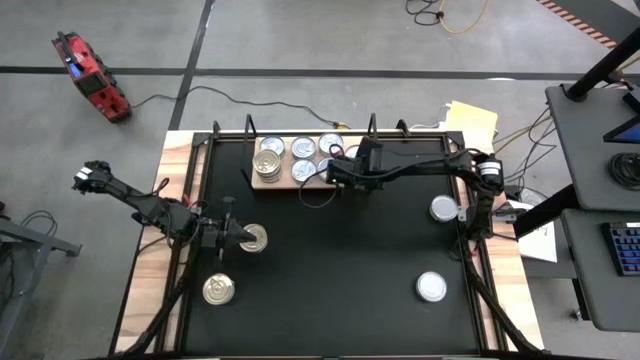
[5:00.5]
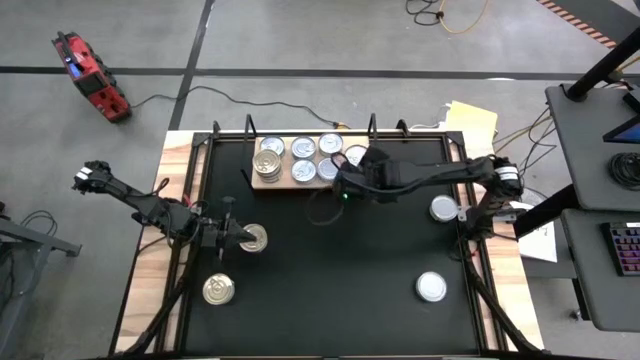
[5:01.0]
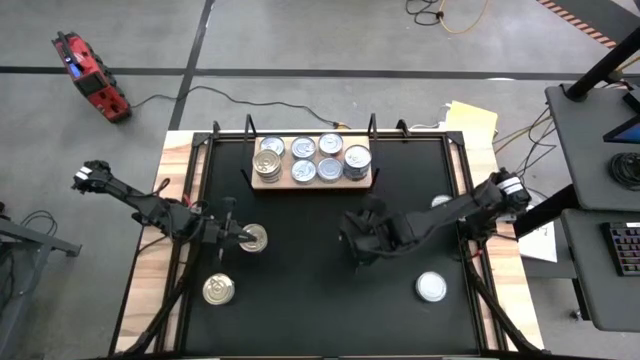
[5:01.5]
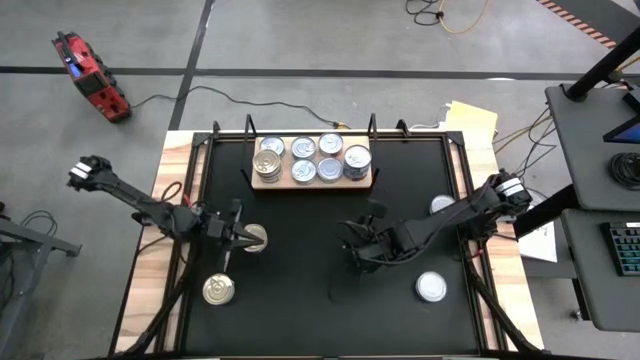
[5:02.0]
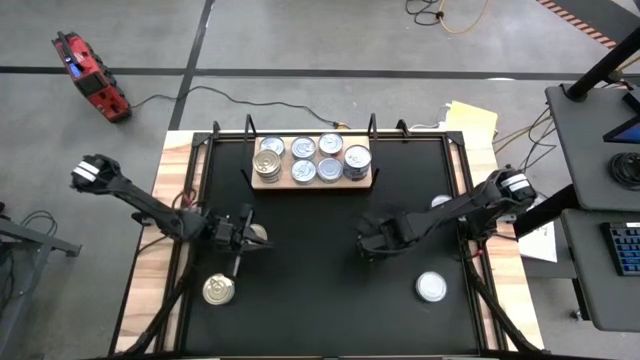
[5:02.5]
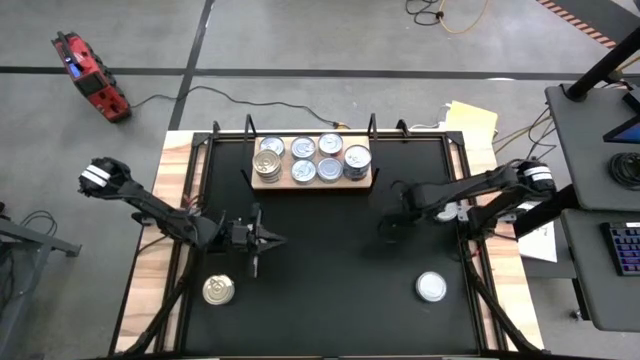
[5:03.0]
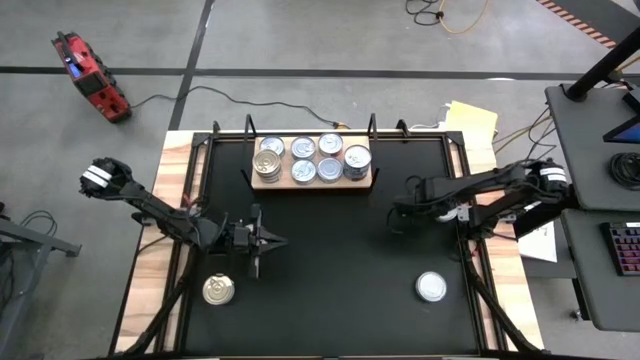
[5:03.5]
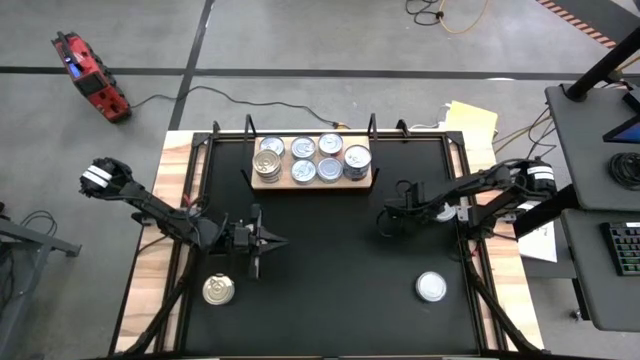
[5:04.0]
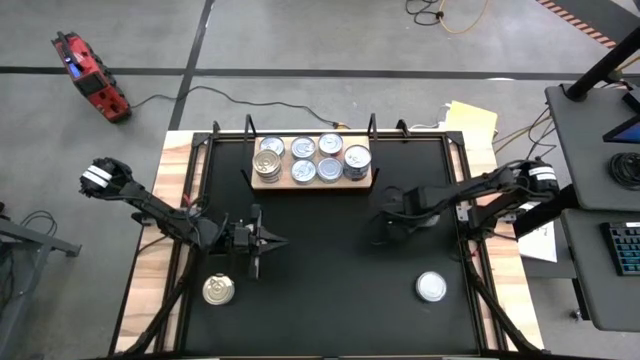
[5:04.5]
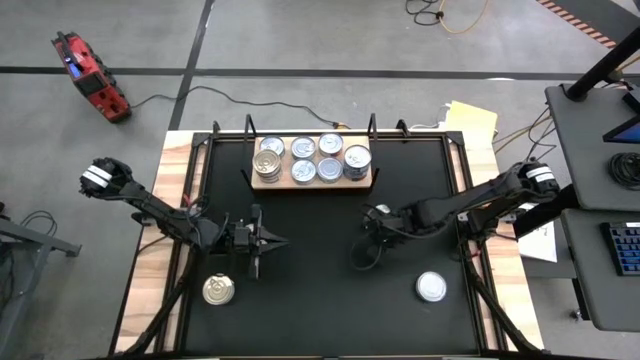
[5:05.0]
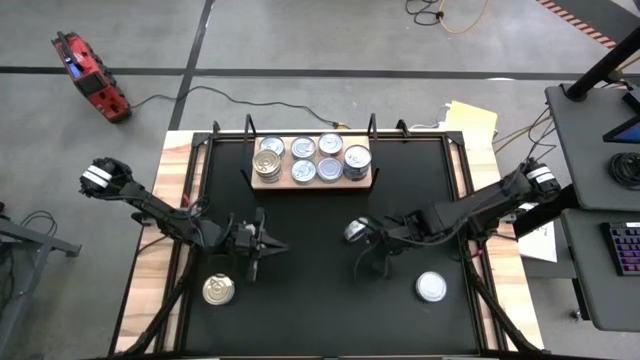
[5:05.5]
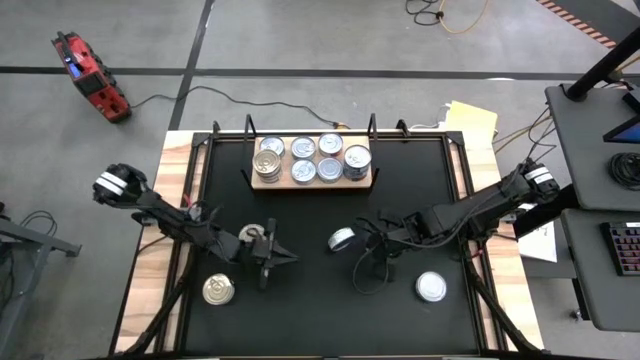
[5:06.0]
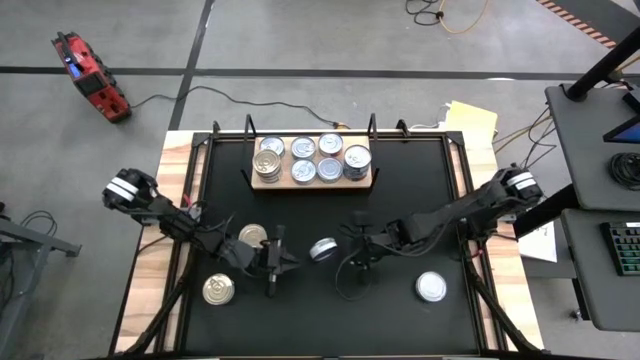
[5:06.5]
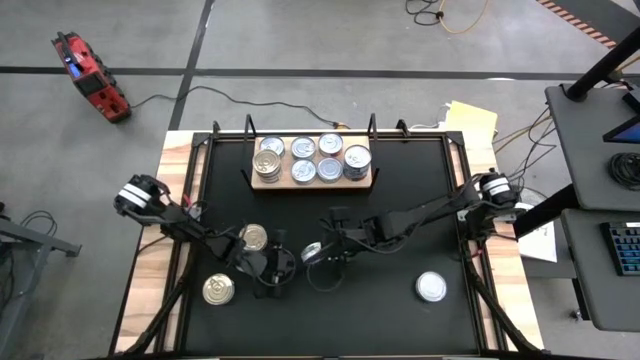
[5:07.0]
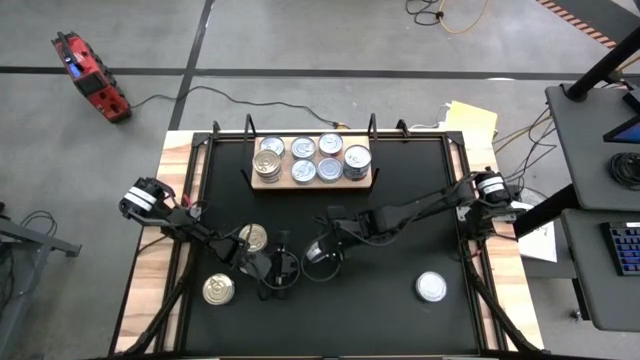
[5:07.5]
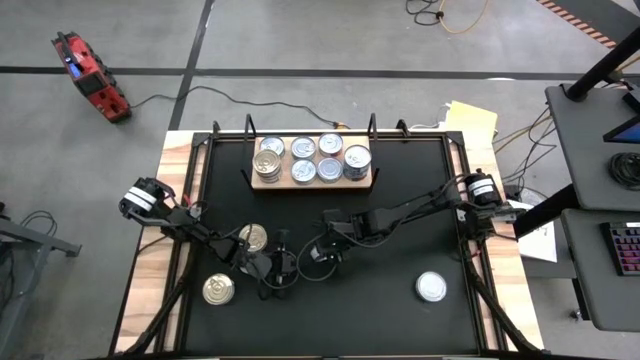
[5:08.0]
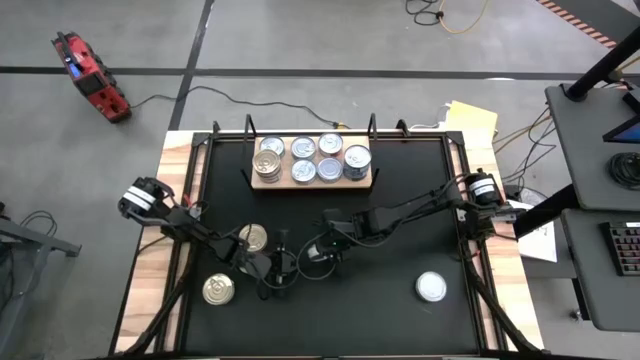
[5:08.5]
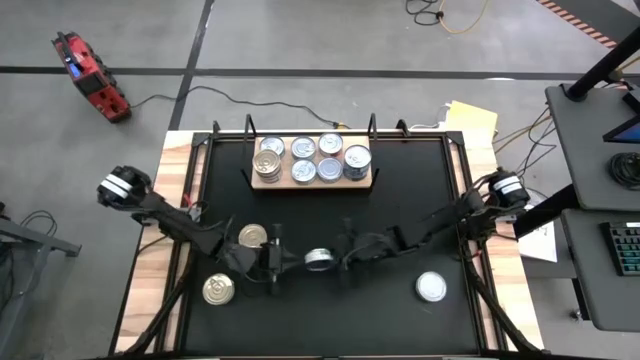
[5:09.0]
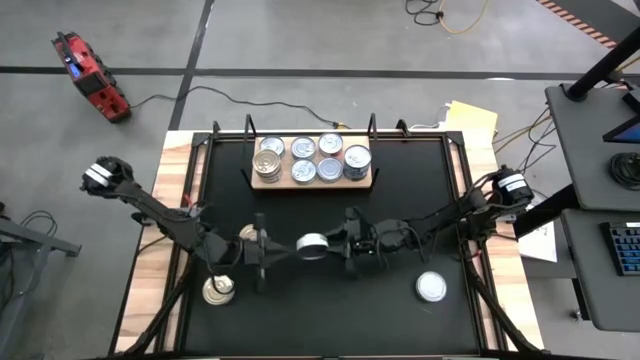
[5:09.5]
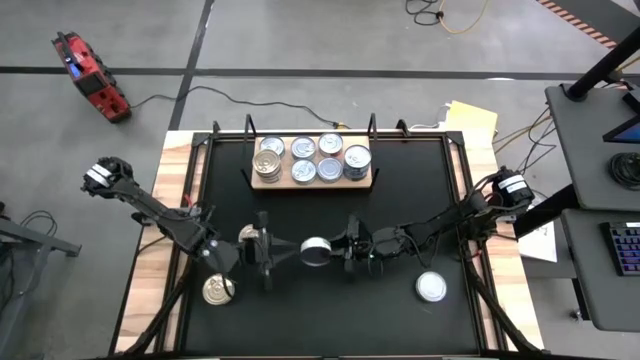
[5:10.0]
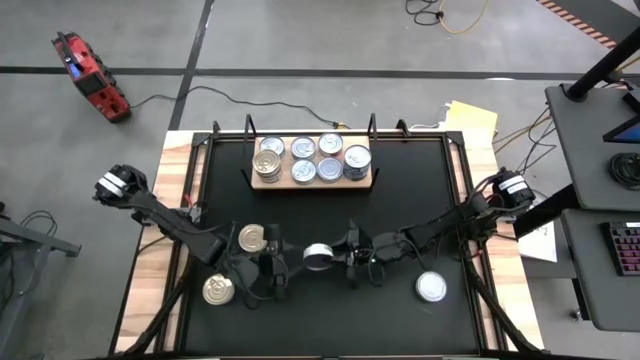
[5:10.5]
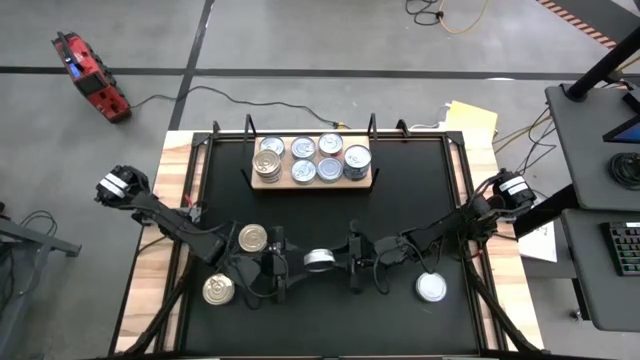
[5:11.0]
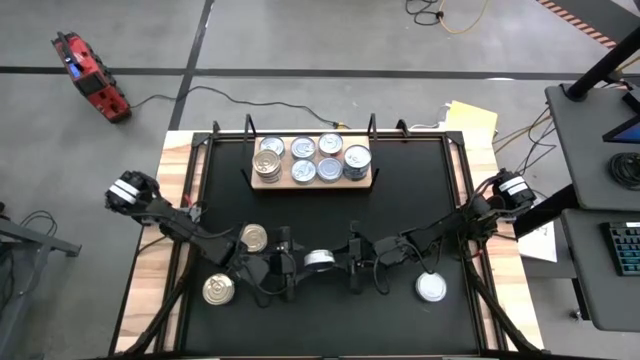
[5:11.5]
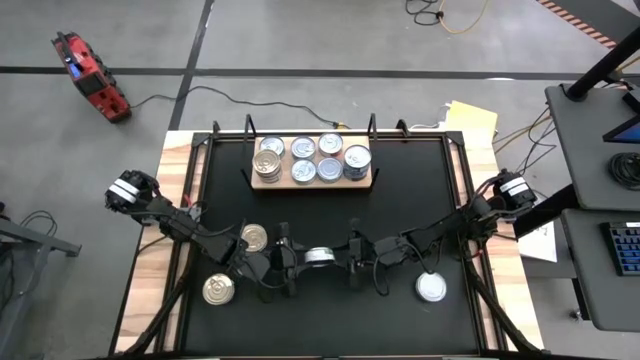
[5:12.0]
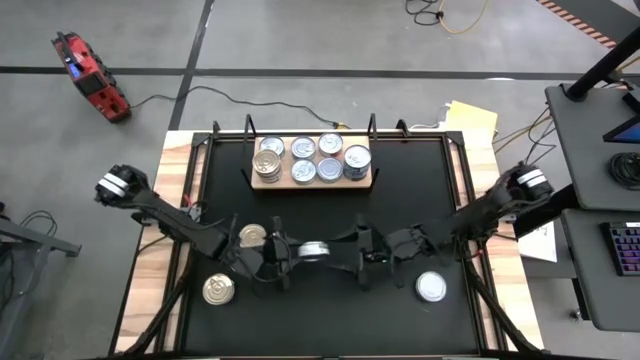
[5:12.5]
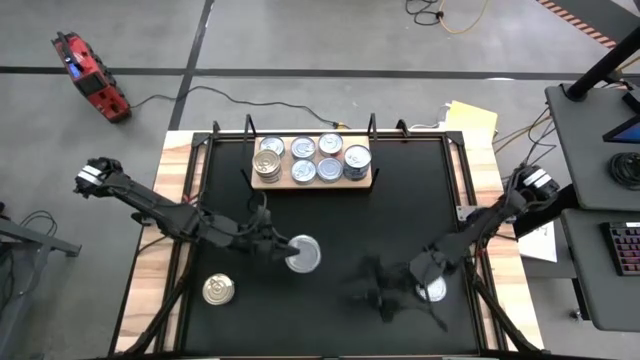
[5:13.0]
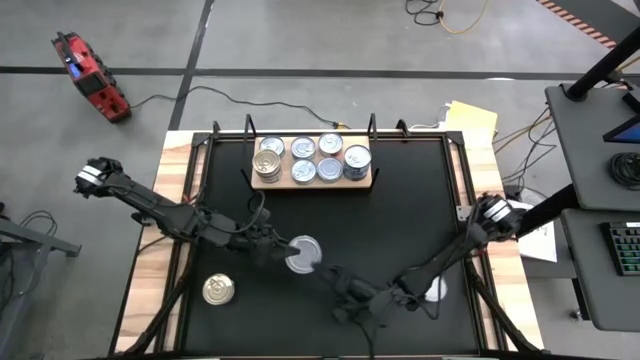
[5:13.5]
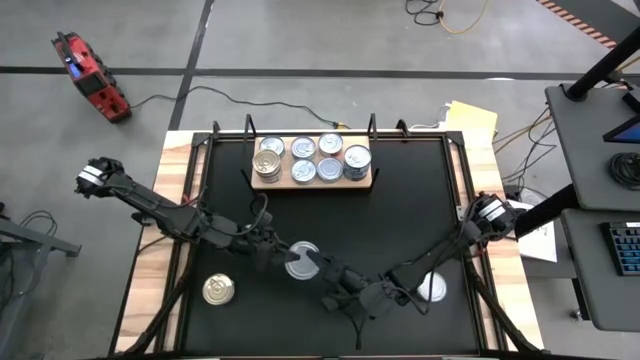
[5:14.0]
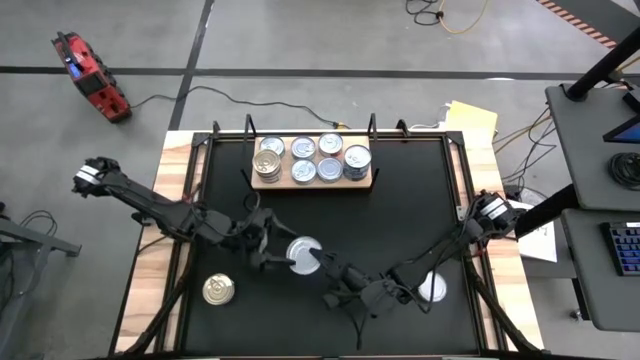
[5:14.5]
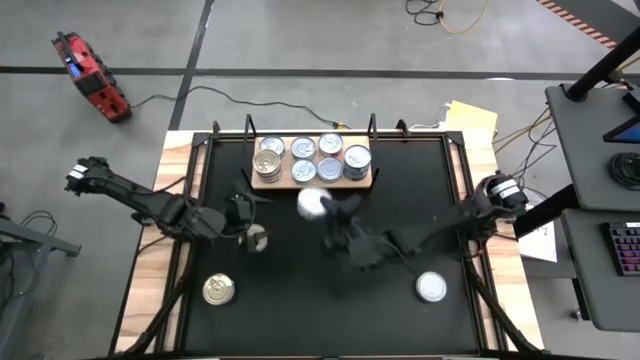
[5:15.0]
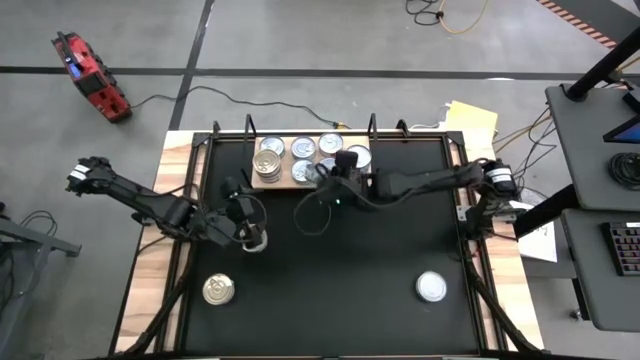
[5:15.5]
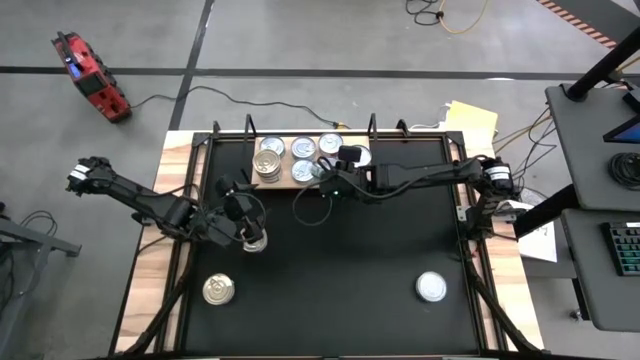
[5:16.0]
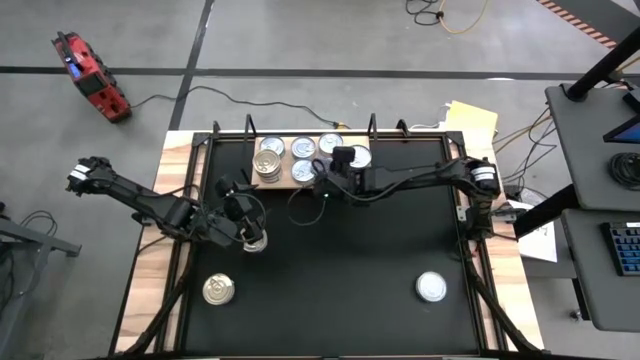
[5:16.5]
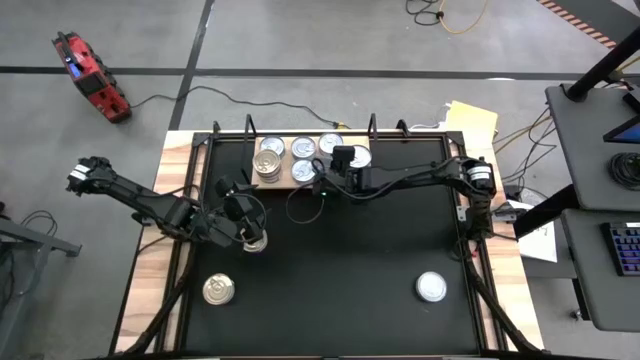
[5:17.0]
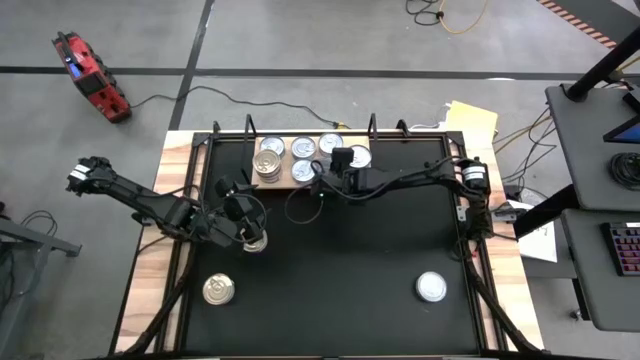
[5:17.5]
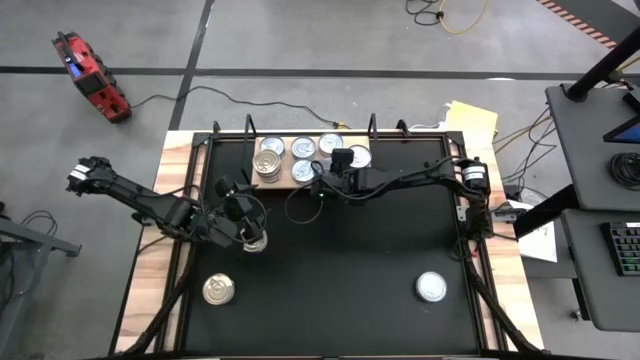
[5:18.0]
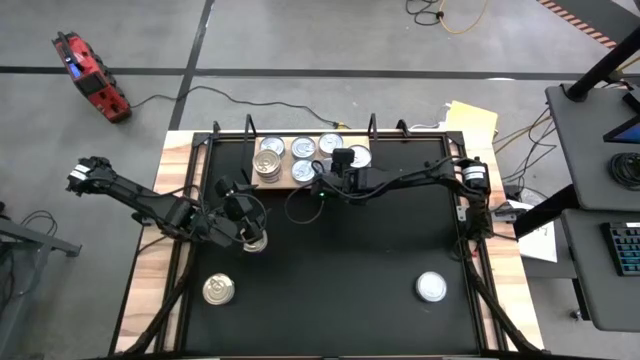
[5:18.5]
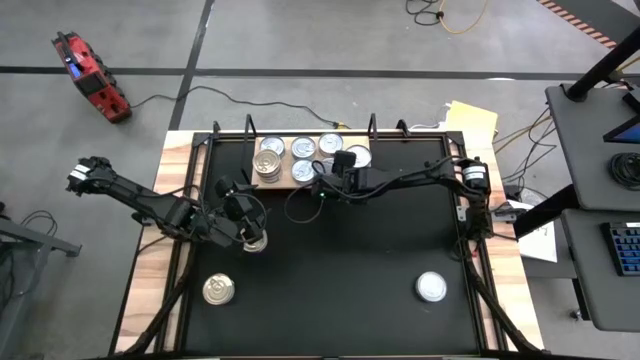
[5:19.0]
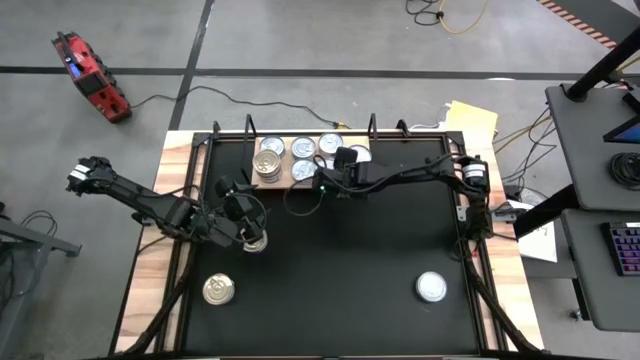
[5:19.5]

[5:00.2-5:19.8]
Task: Stack canned seafood by type on shelf
Stack the green tuna can on top of the other green tuna can on the shelf

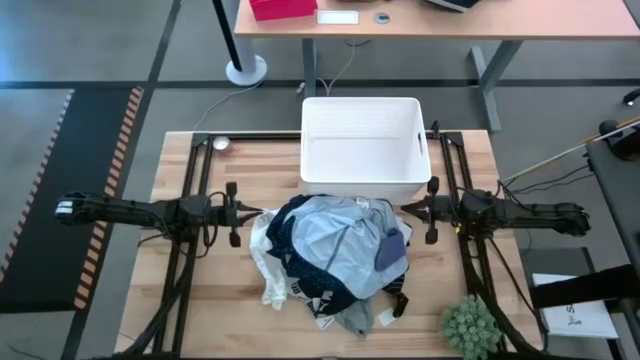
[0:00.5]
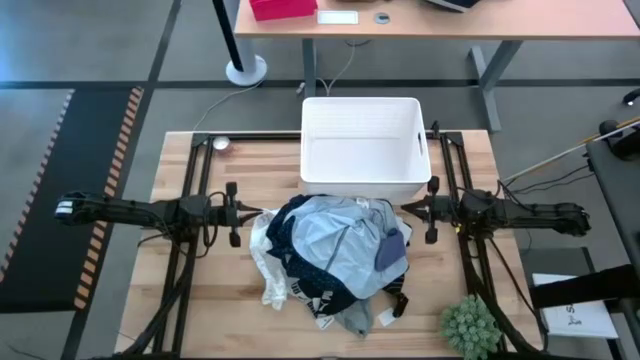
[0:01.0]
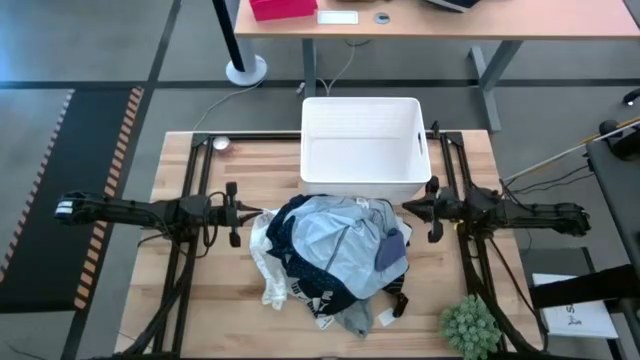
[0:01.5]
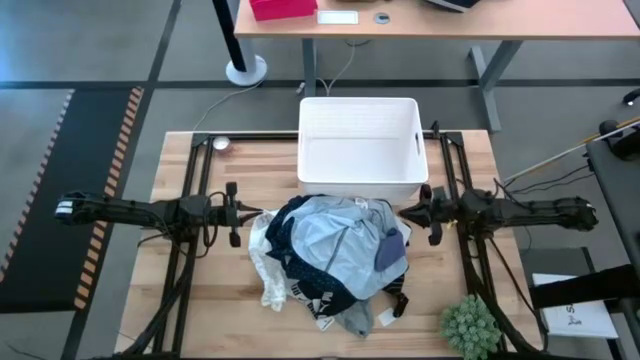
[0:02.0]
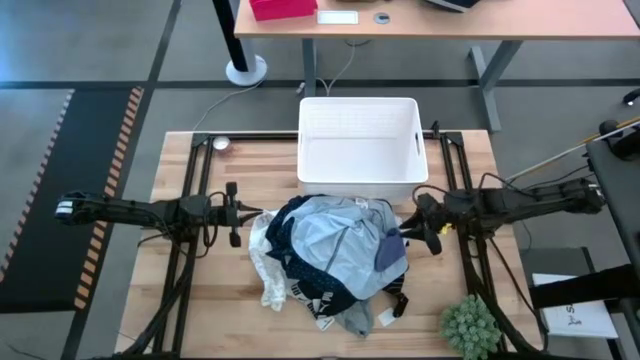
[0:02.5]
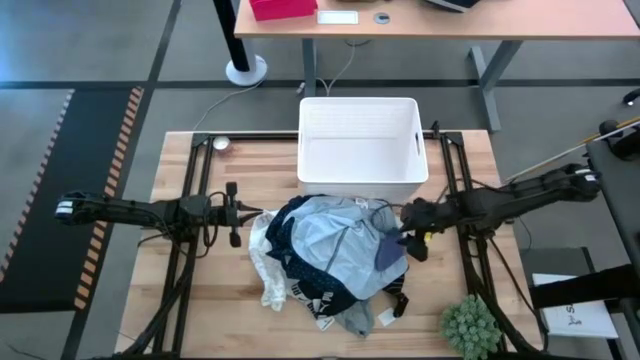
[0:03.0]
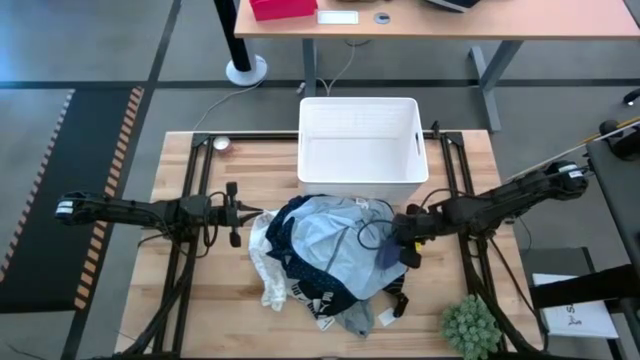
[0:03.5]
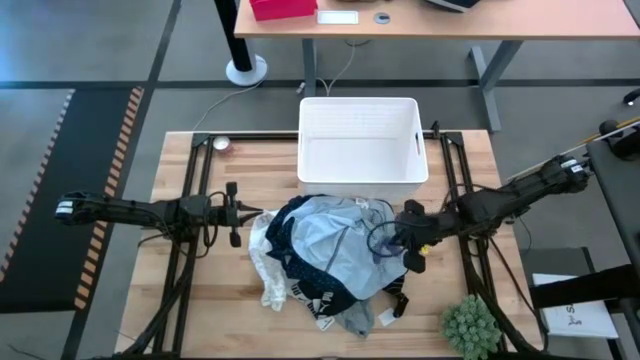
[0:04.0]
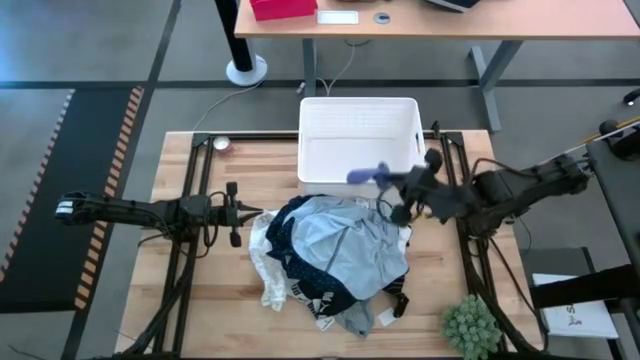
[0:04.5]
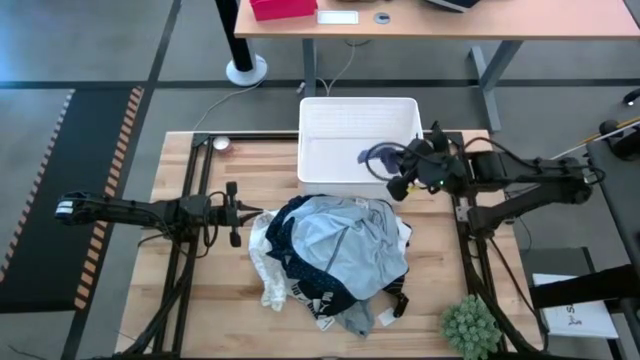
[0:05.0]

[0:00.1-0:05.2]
Task: Sort clothes
Put the purple sock into the white laundry bin
